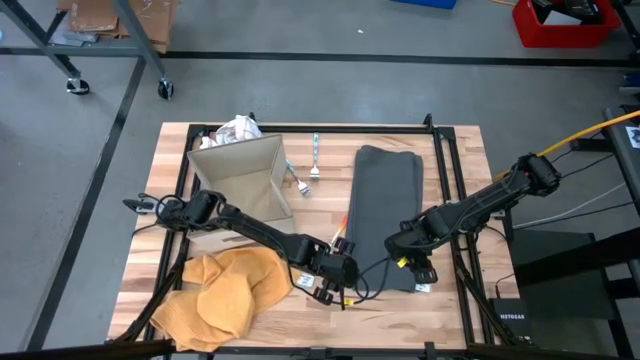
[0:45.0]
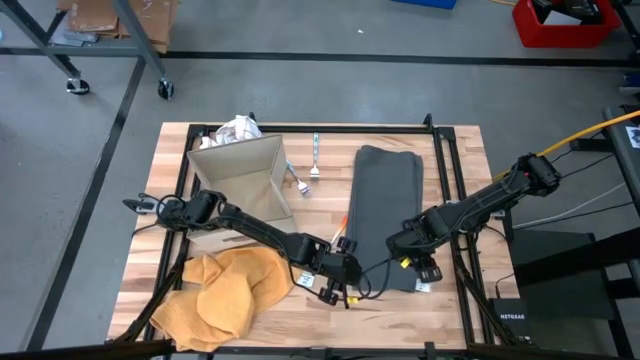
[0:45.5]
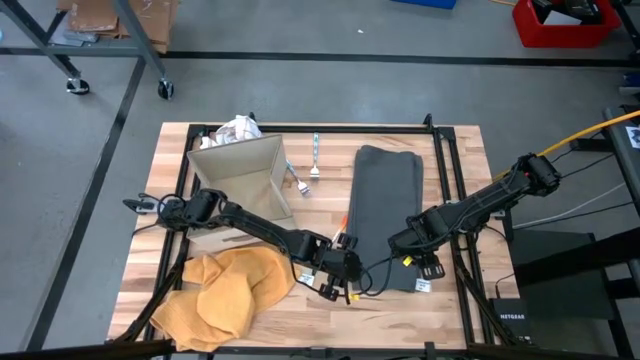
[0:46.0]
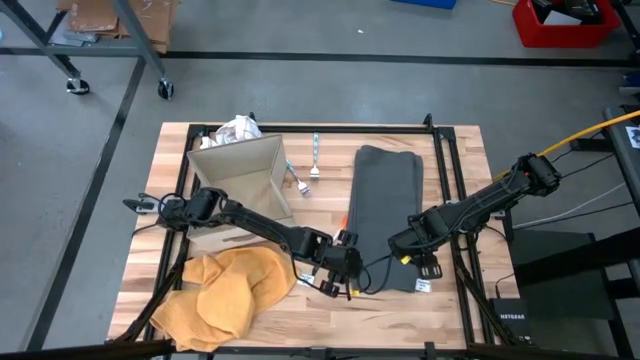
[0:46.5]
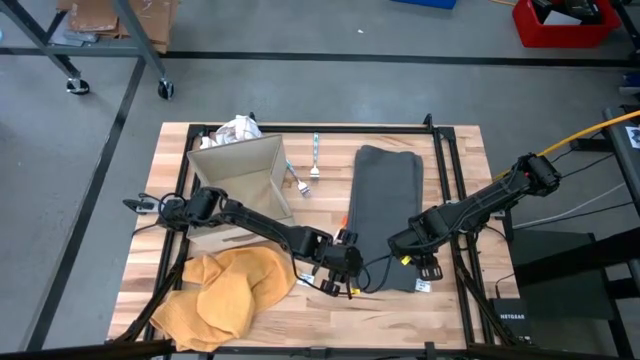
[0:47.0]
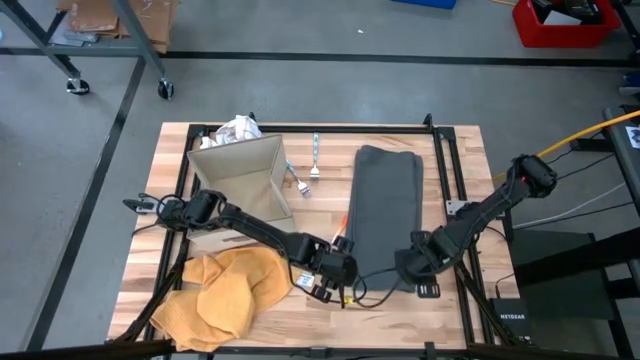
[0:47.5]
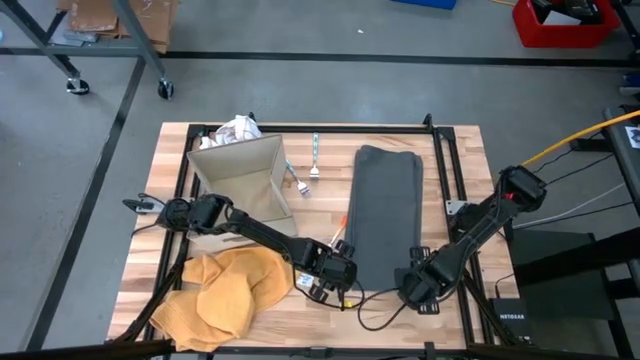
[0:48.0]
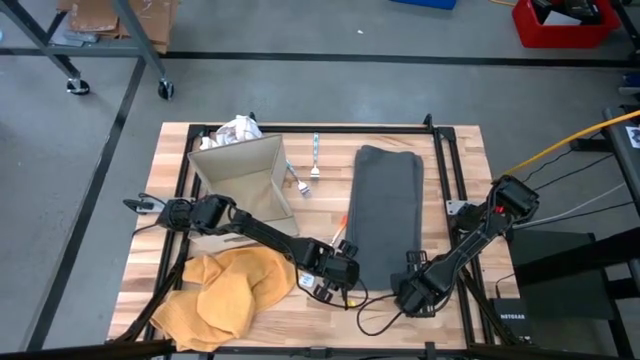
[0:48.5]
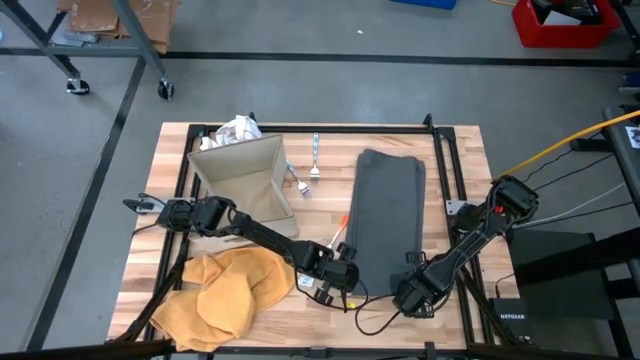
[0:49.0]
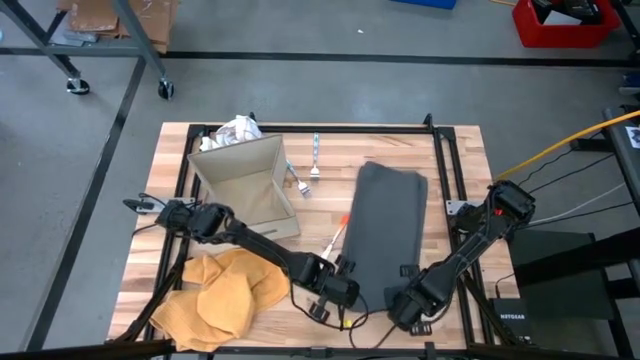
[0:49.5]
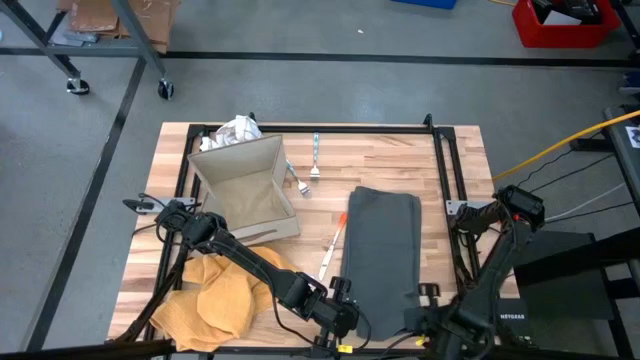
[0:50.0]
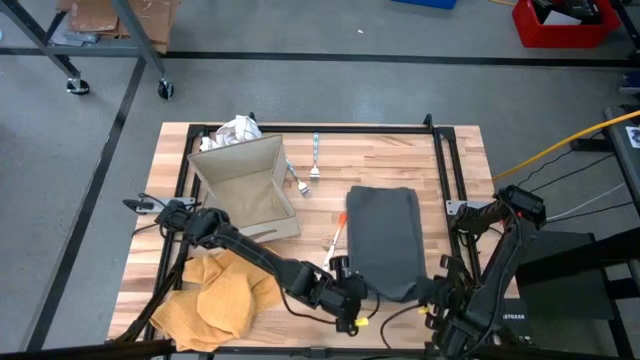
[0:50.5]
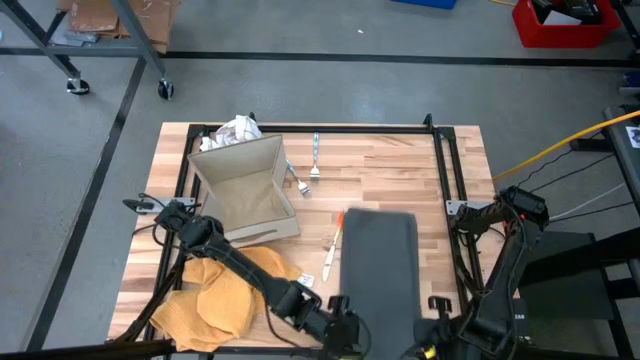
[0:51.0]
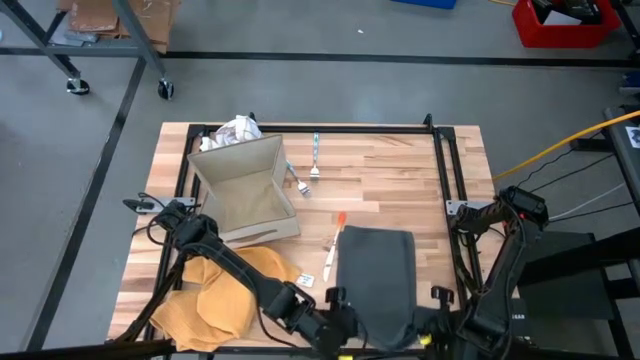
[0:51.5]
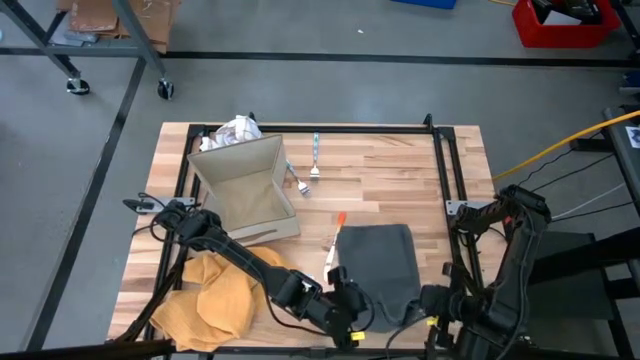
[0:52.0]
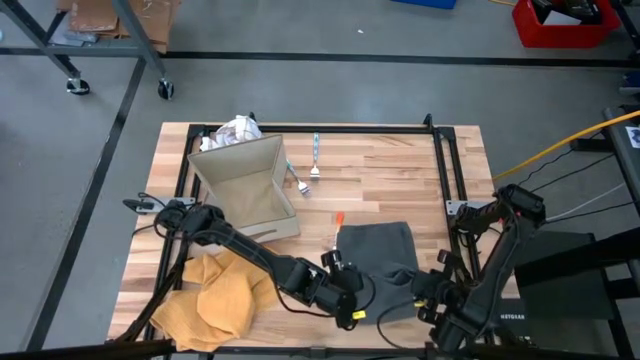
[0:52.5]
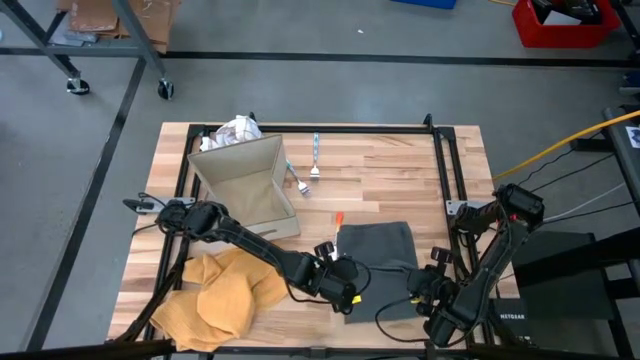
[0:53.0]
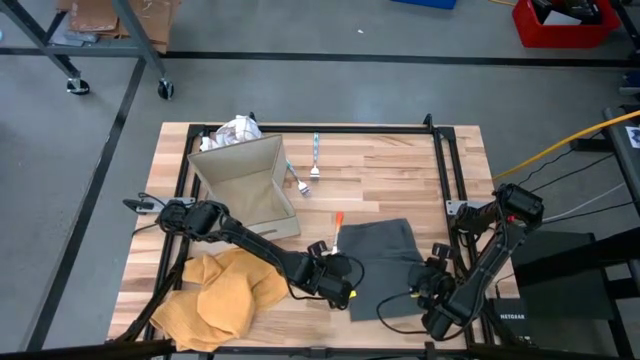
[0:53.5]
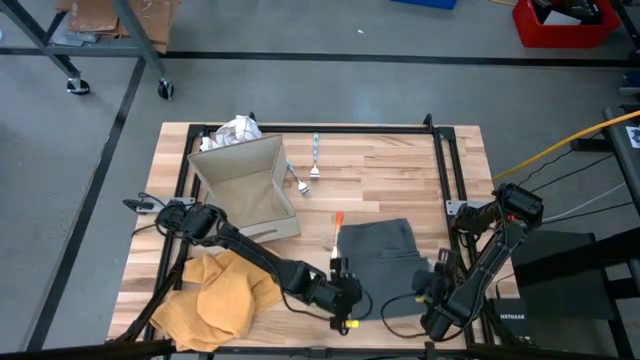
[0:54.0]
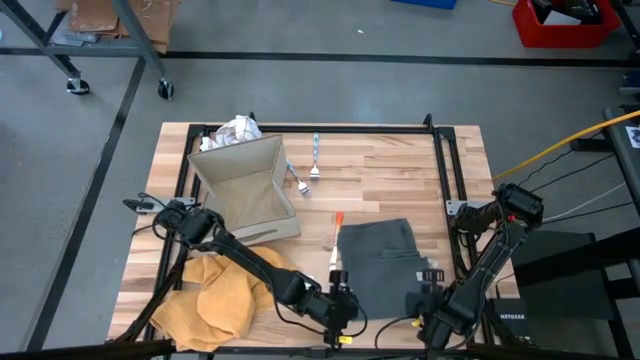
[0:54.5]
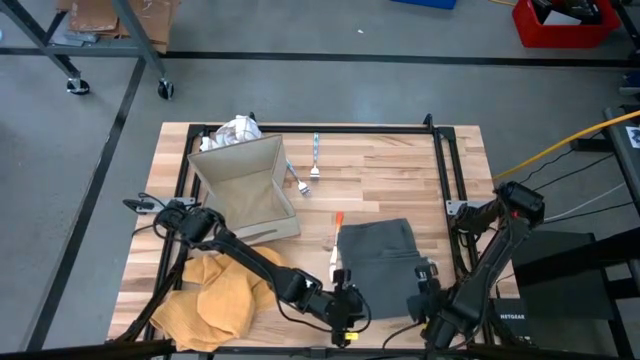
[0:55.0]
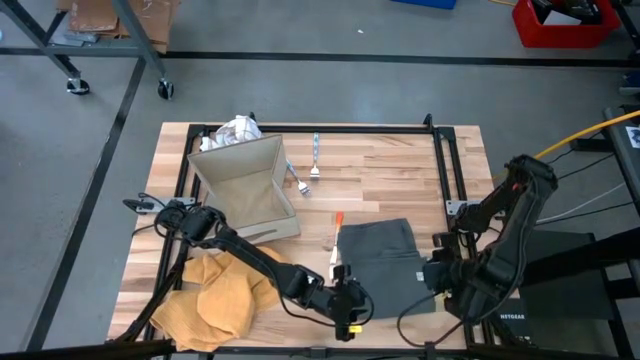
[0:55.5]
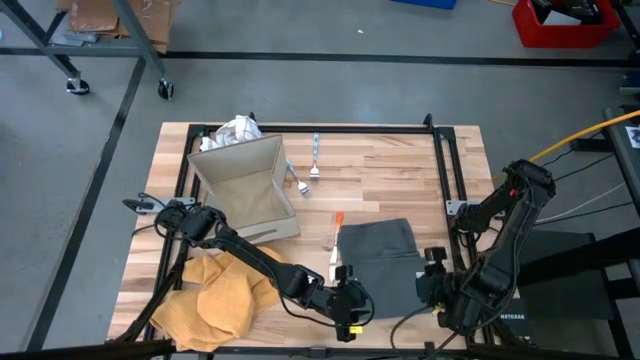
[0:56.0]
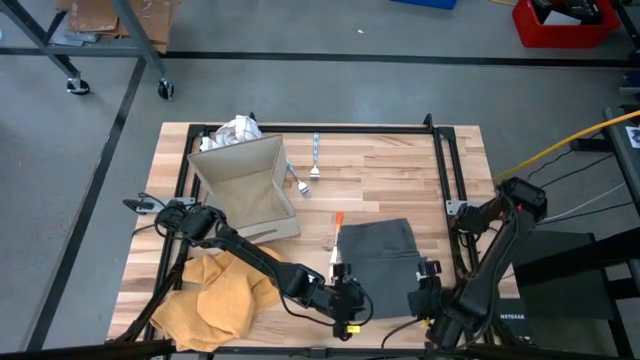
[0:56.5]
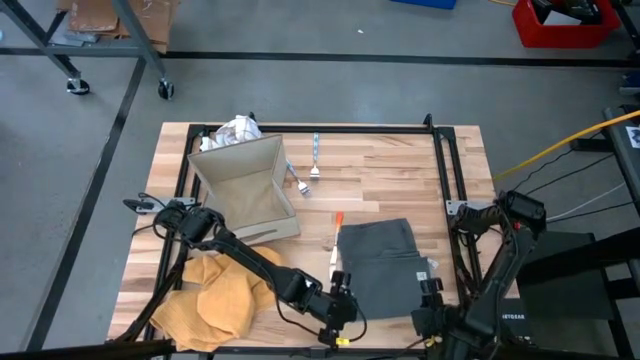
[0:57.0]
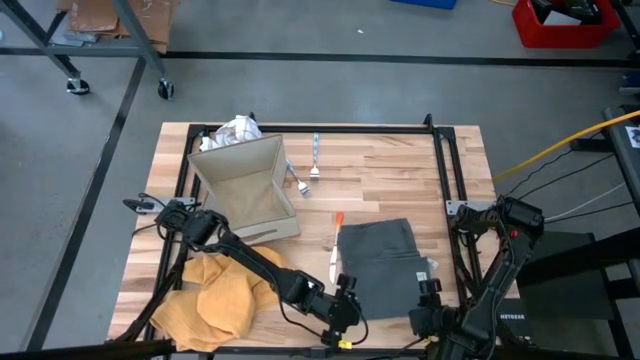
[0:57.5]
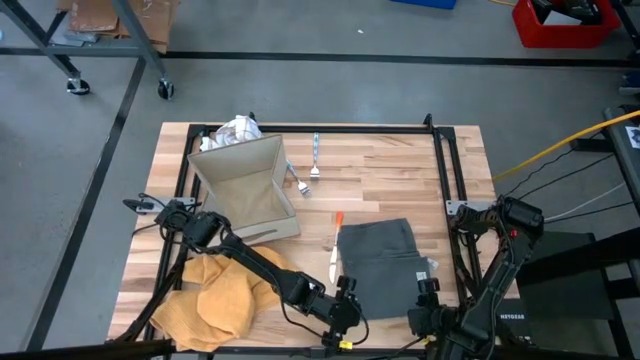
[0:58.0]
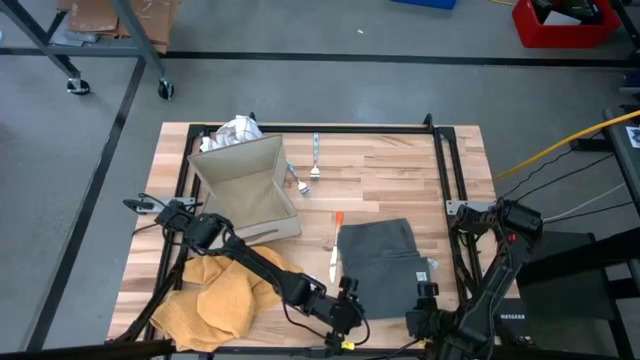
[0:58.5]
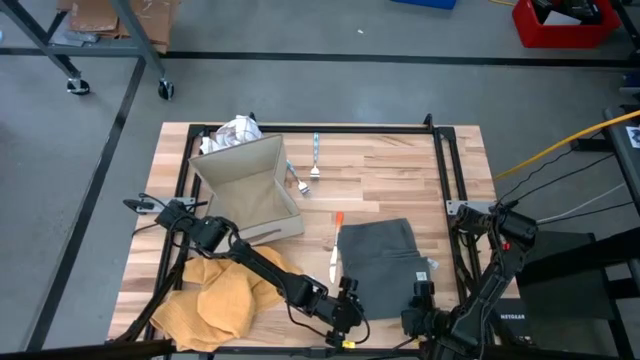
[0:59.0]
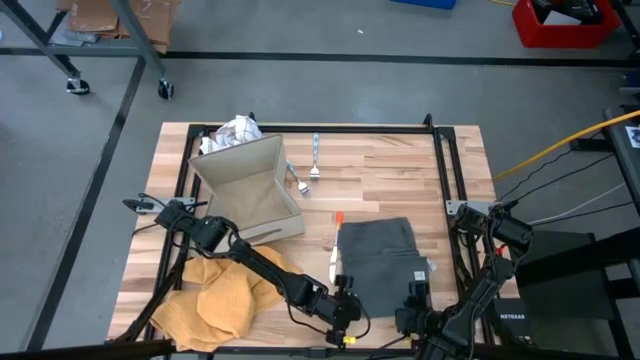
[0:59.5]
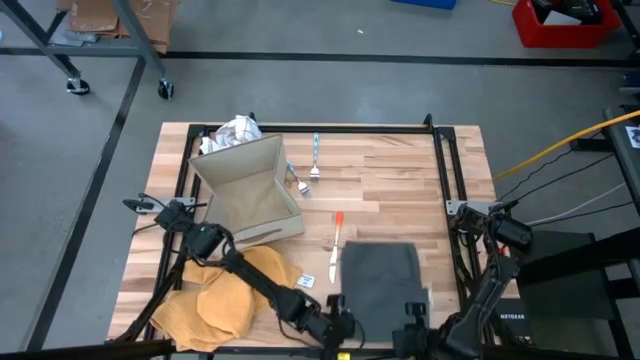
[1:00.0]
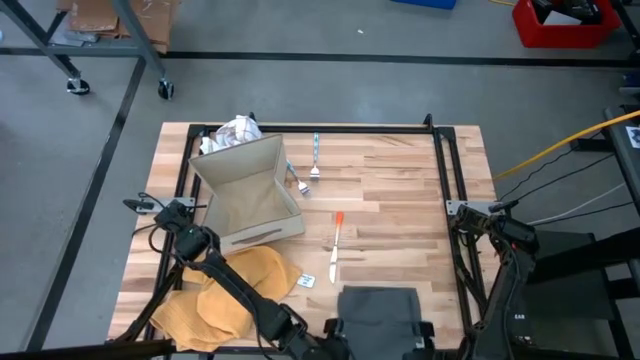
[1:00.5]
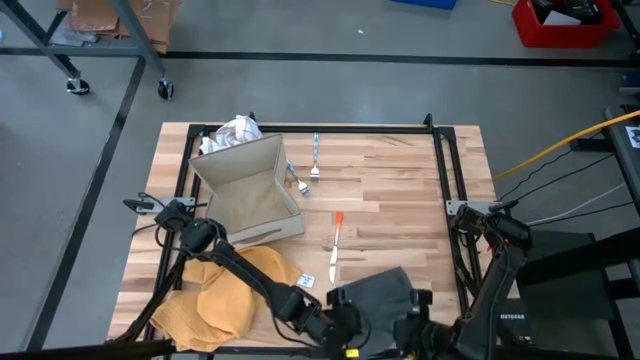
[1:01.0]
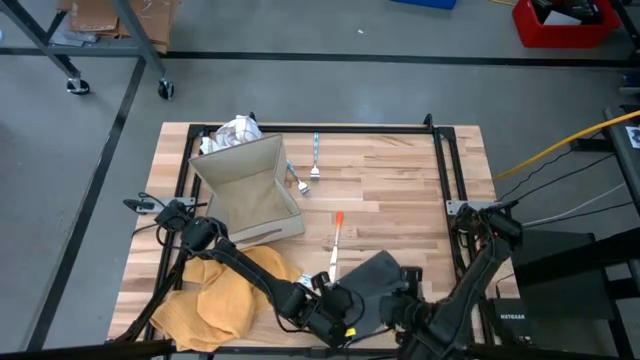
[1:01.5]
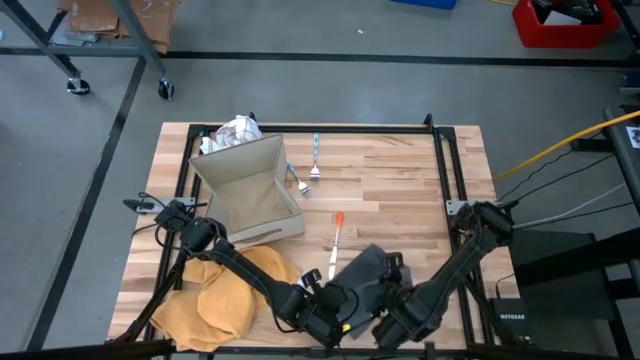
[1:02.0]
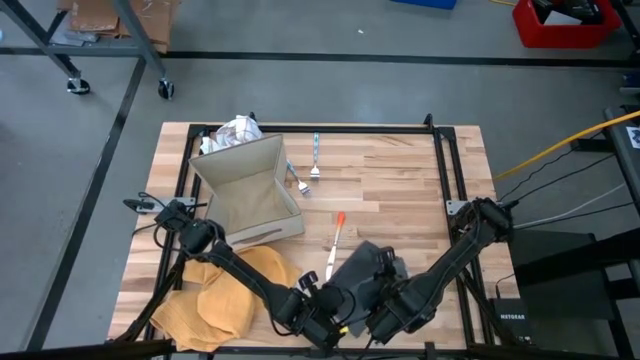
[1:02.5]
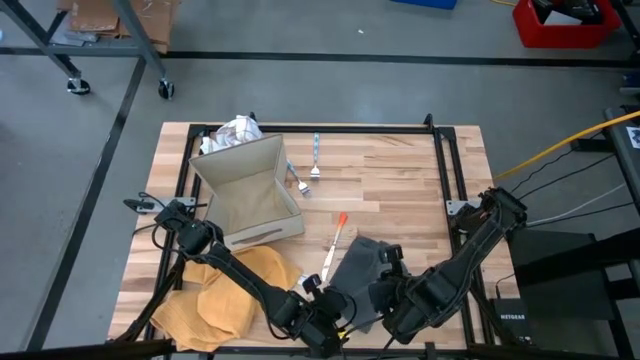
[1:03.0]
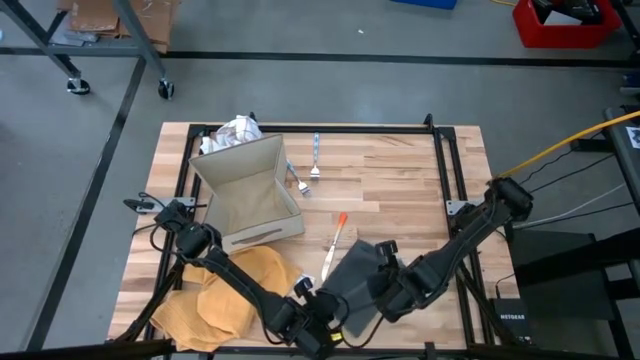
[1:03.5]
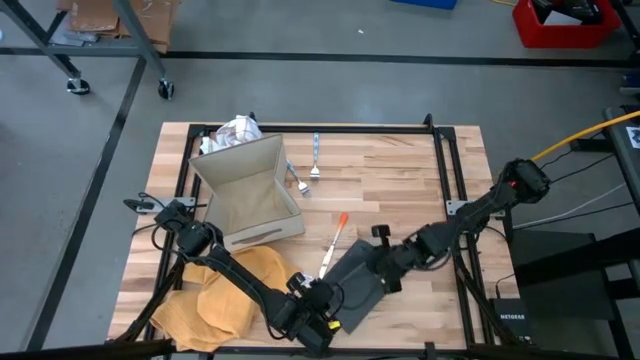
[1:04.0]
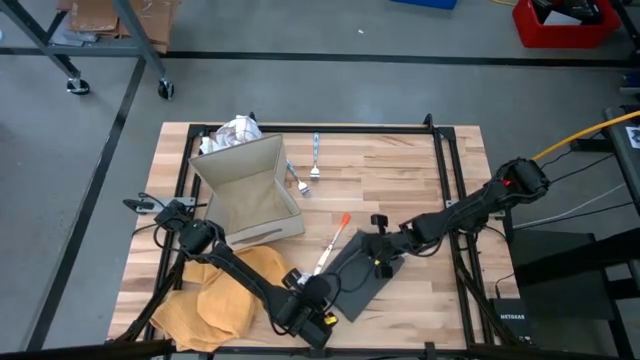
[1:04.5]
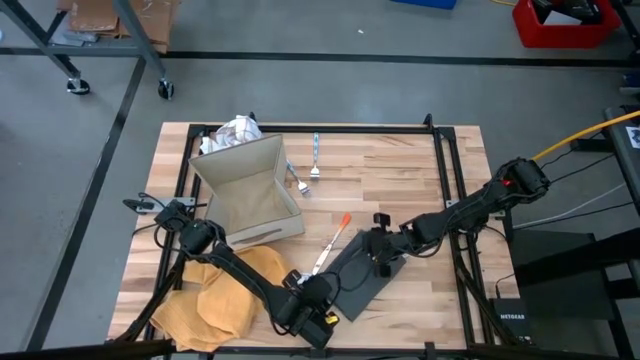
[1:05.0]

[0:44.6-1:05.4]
Task: Fold towel
Fold the gray kitchen towel
